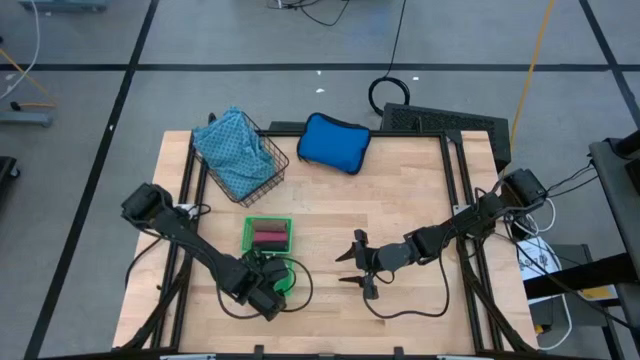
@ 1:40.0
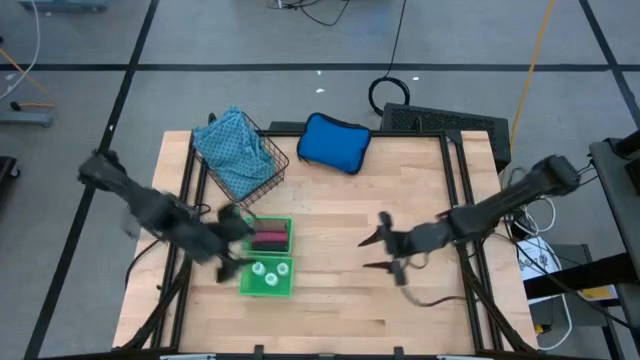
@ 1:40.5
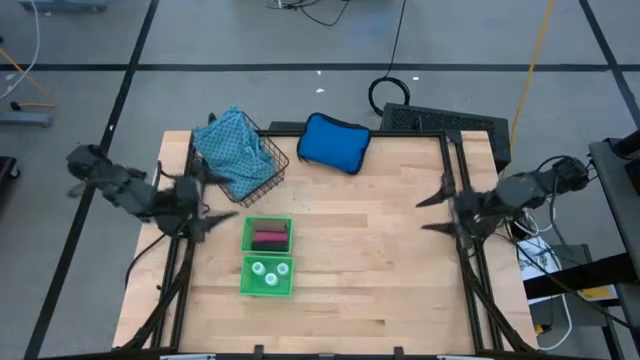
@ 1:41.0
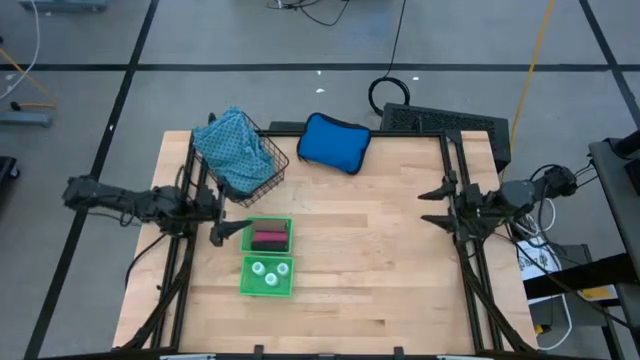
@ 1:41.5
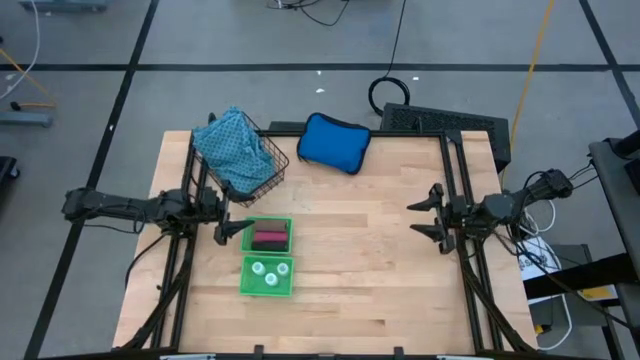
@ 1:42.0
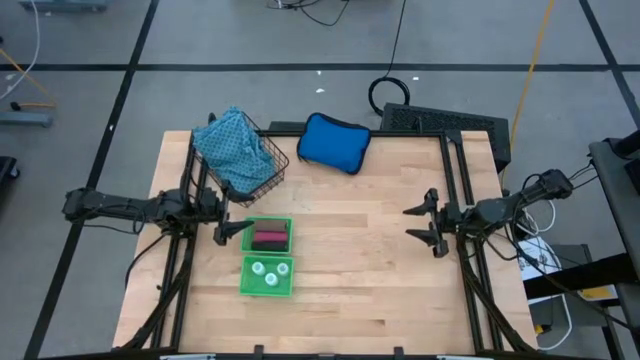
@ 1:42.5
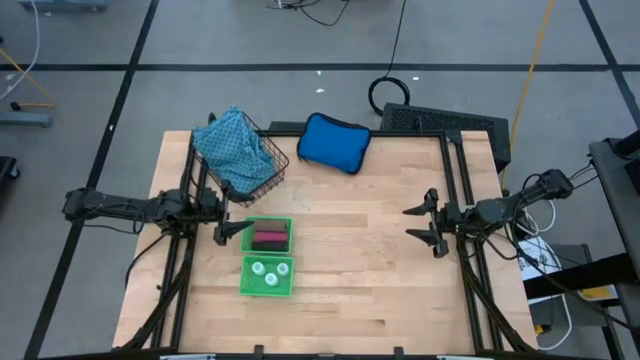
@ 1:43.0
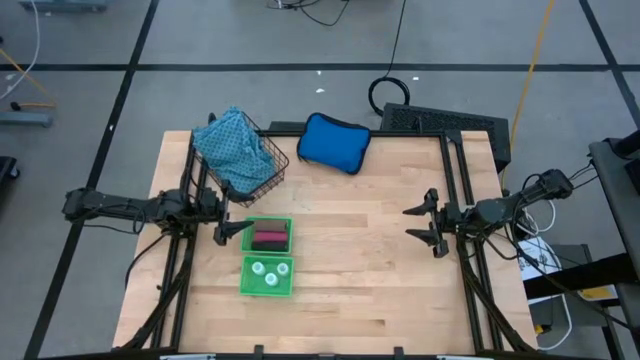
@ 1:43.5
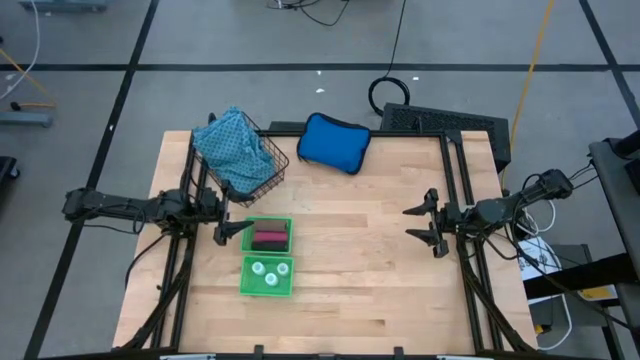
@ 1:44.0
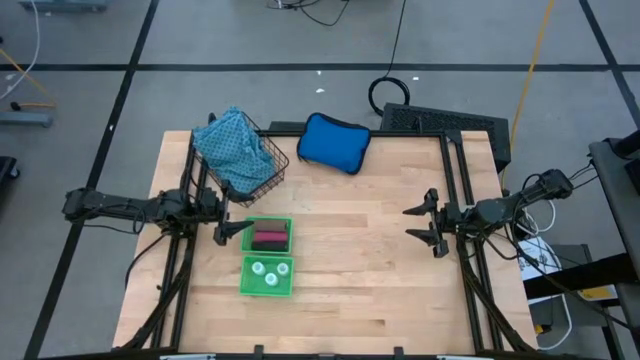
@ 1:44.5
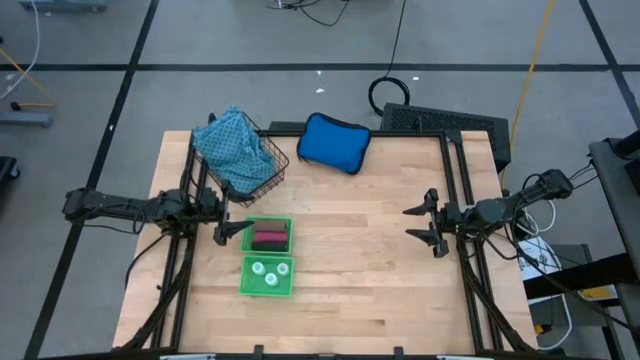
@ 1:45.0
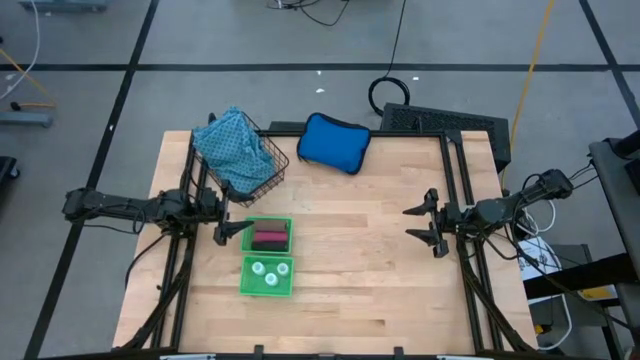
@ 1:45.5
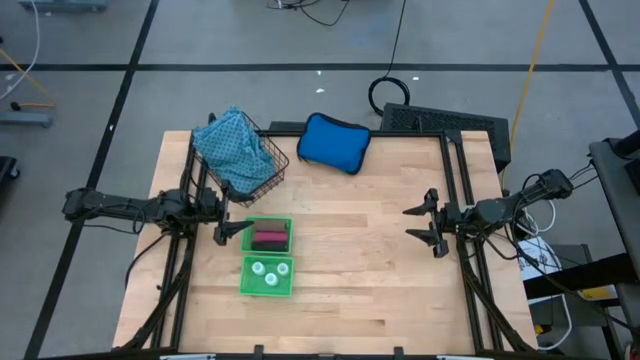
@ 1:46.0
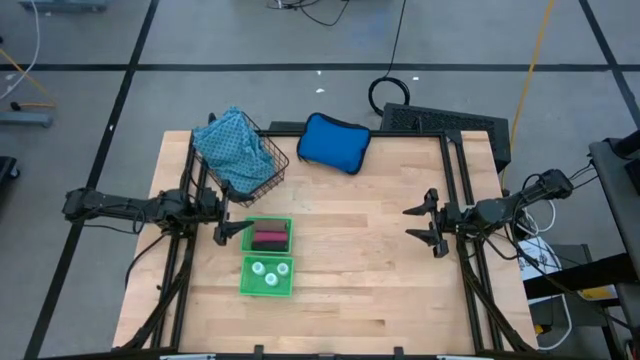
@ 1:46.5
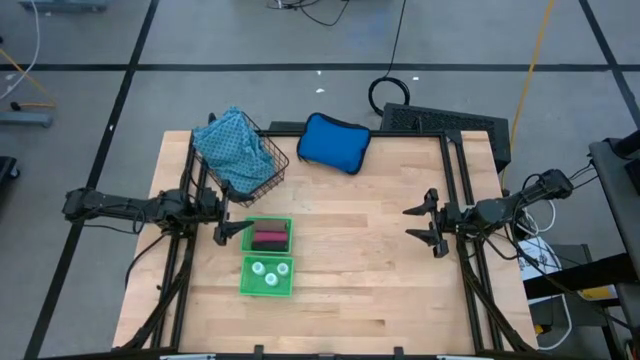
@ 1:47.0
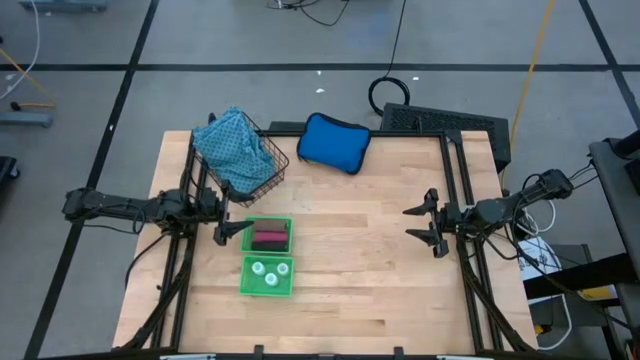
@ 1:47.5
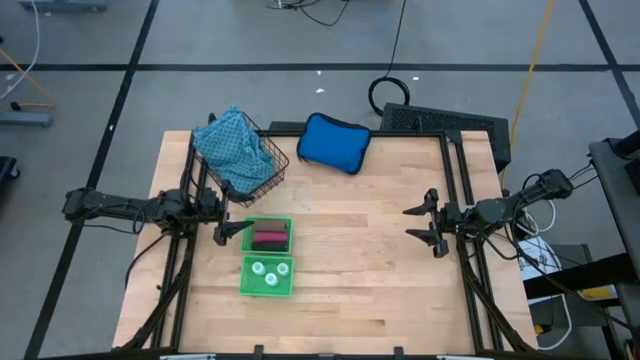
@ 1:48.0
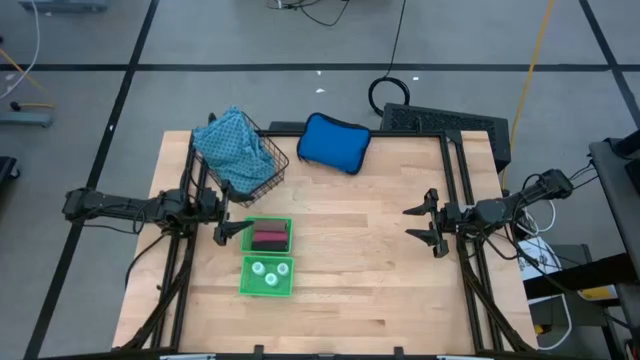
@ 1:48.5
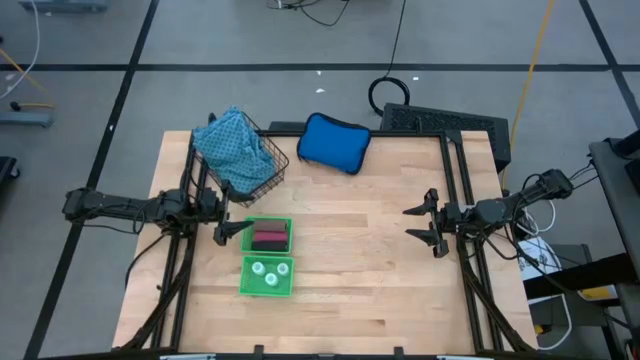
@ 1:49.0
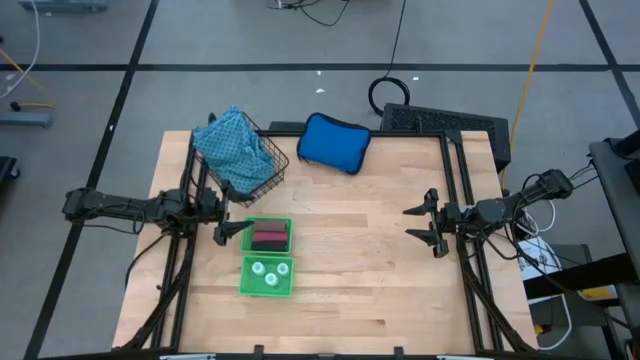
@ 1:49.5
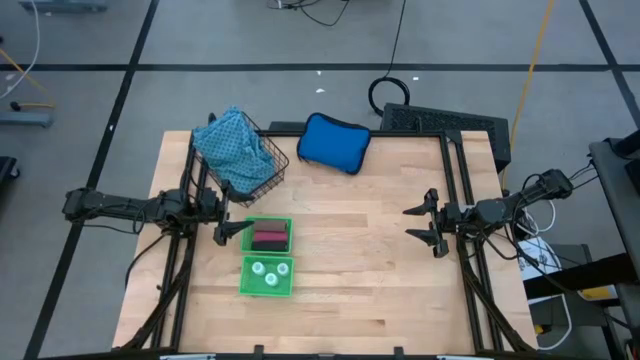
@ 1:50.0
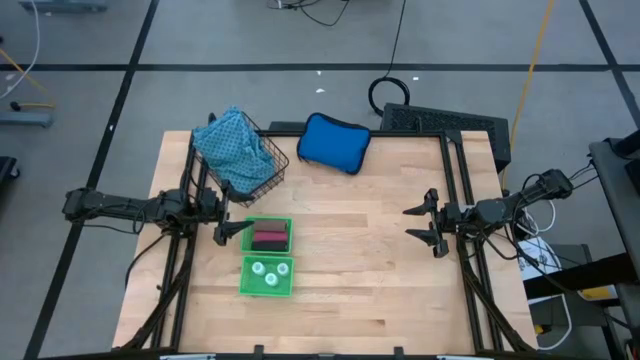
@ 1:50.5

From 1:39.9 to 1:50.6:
Task: Pick & Place Medicine items
Return to Home Position
